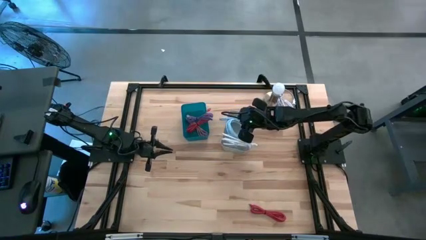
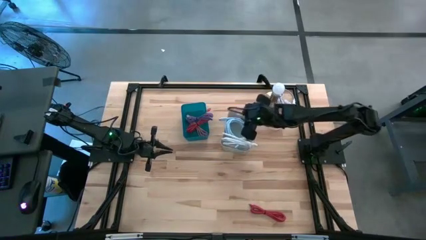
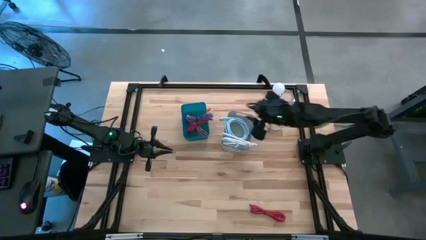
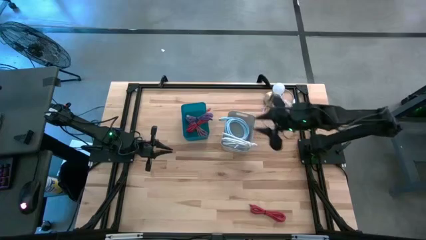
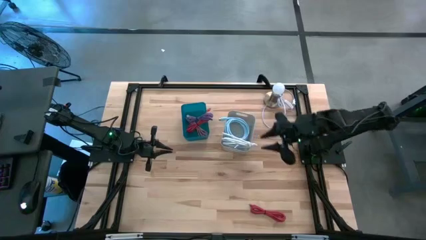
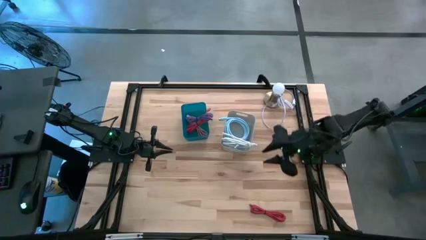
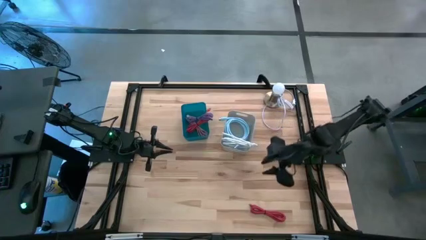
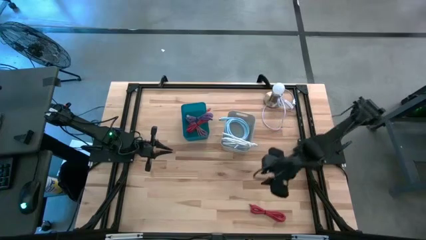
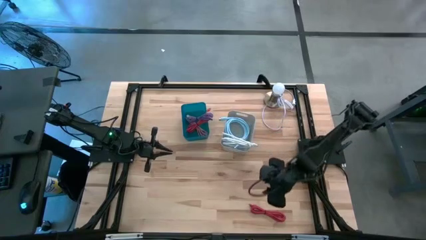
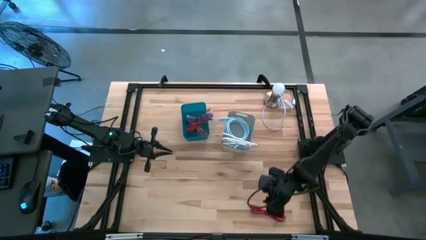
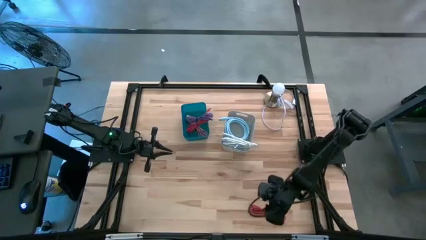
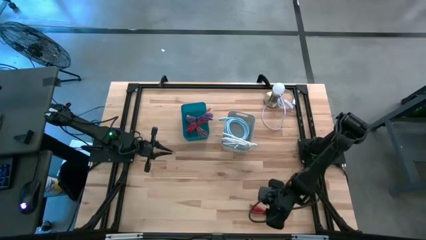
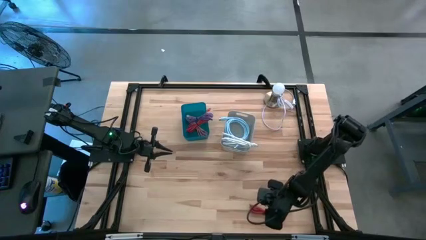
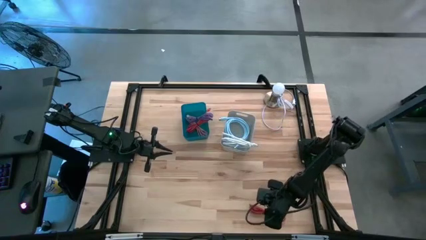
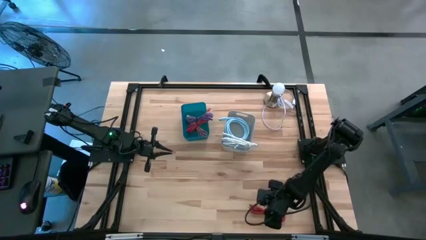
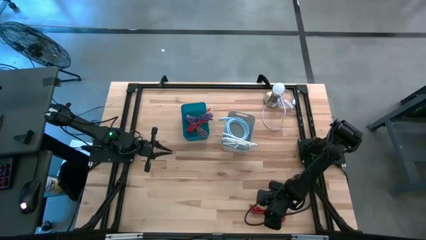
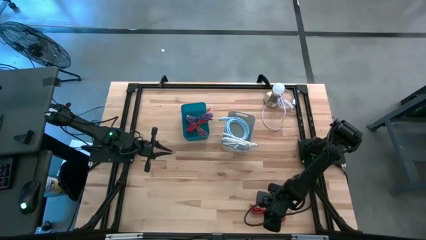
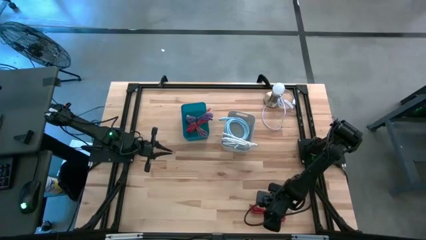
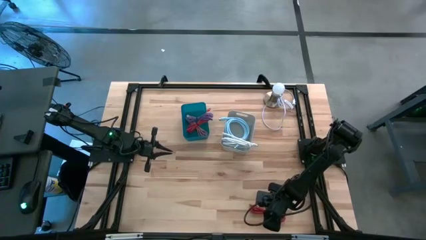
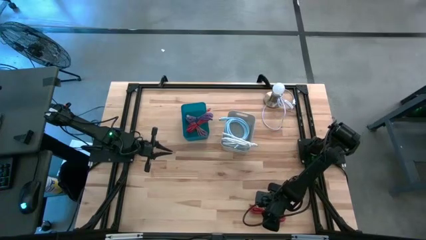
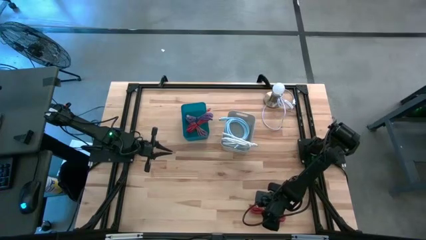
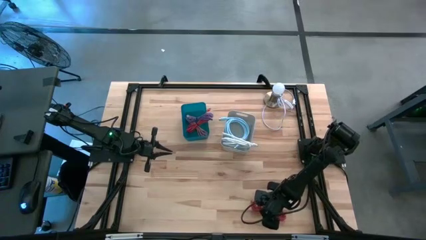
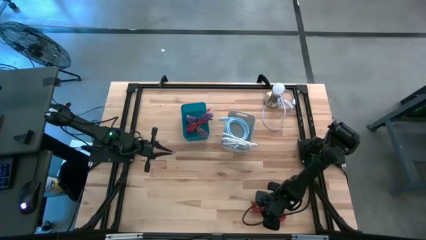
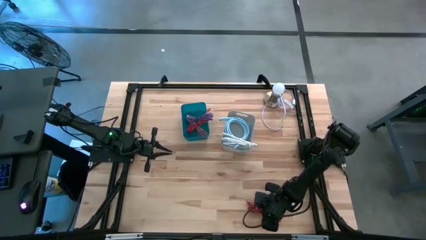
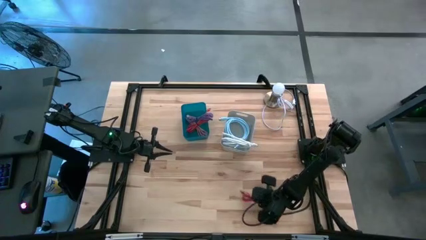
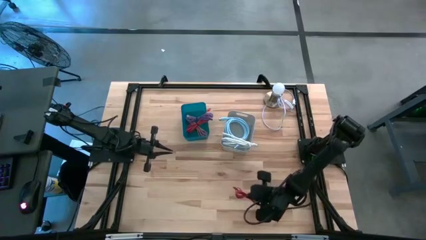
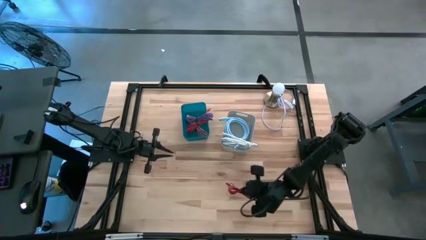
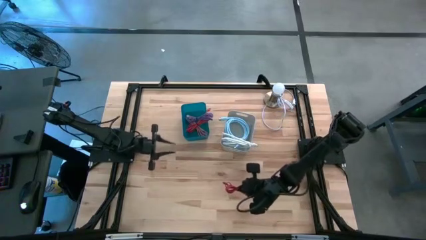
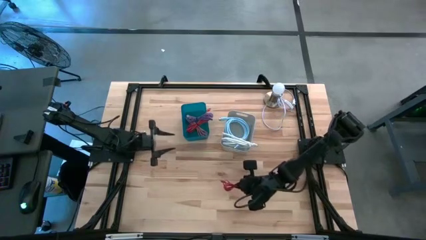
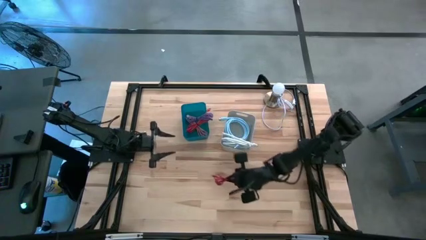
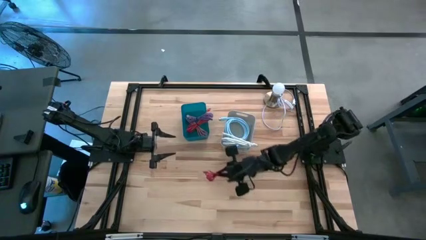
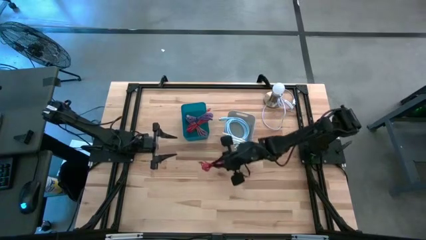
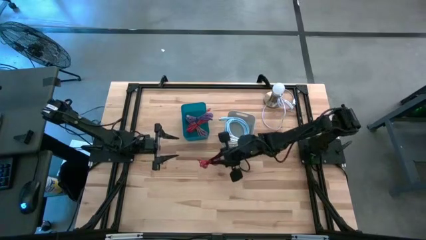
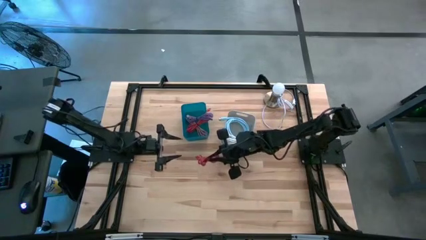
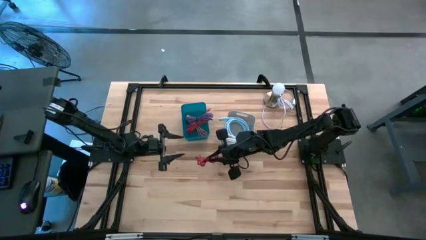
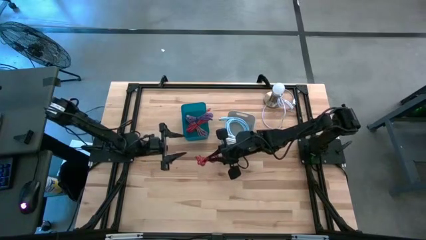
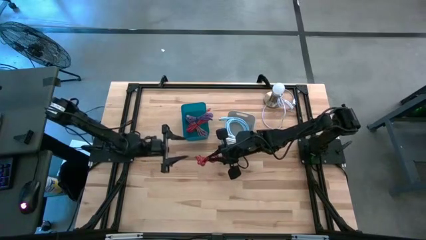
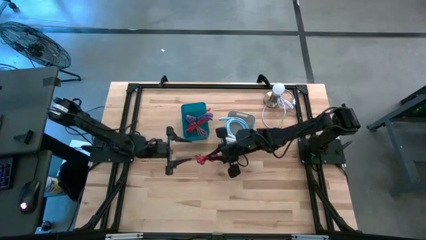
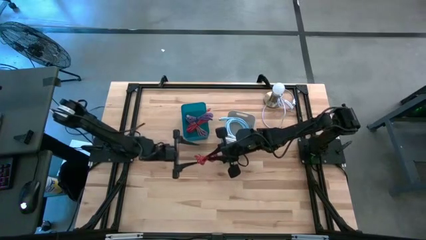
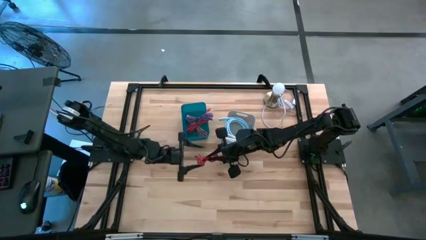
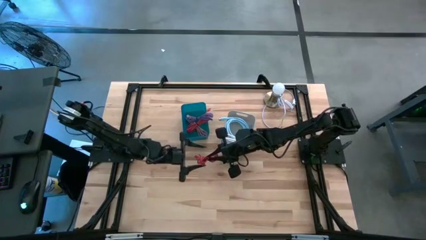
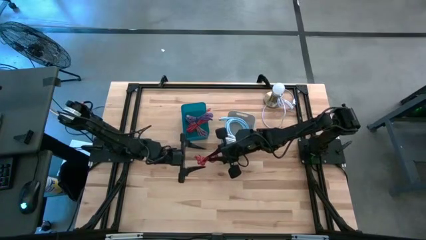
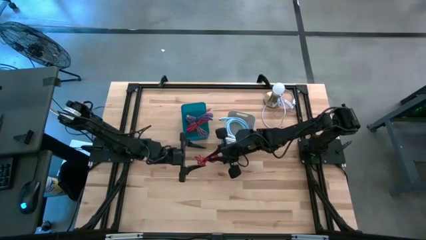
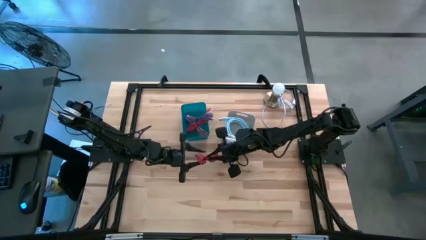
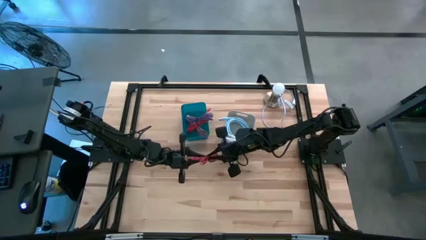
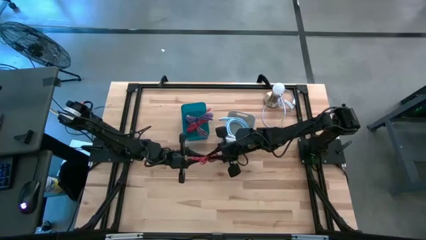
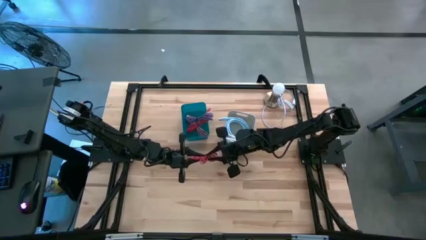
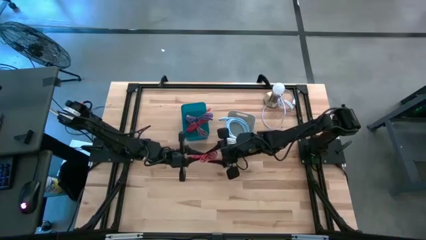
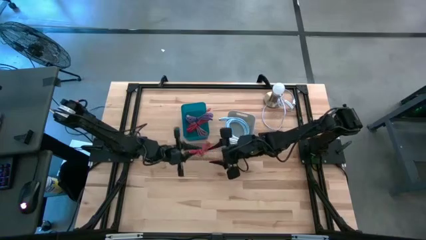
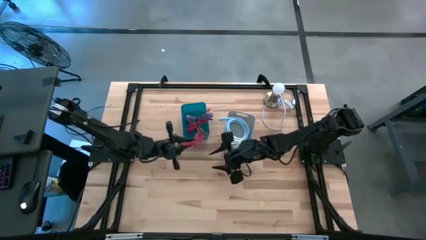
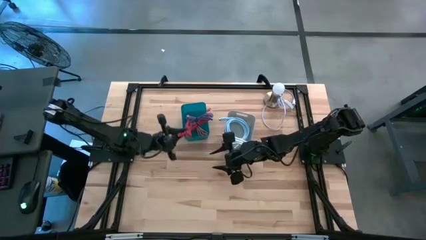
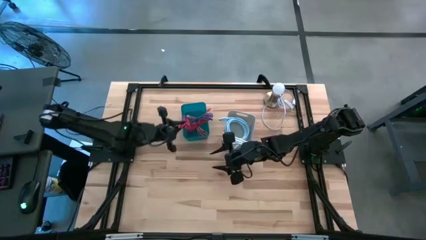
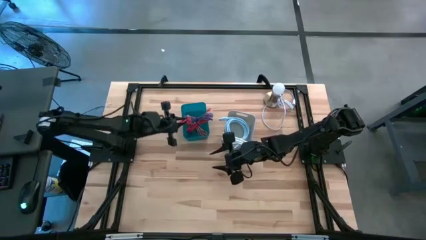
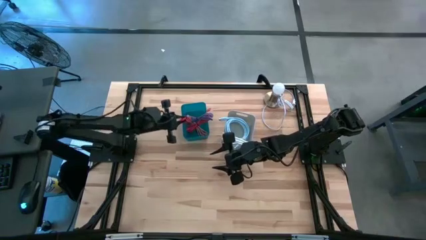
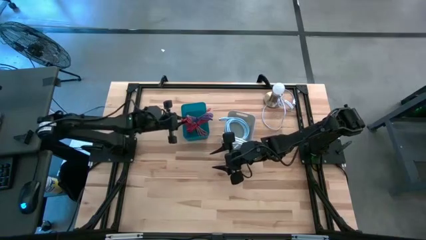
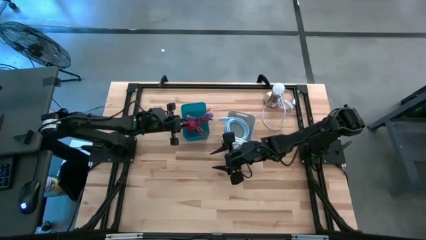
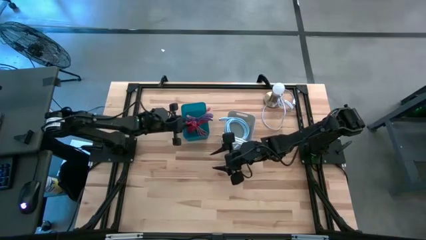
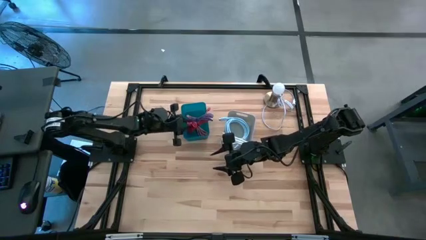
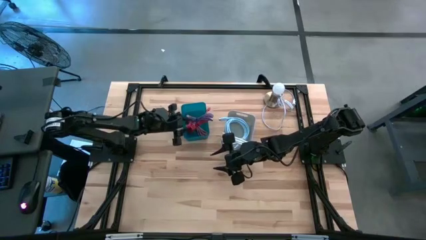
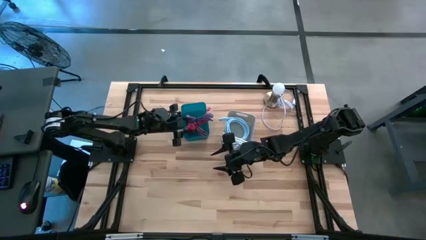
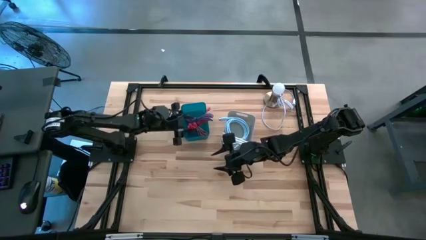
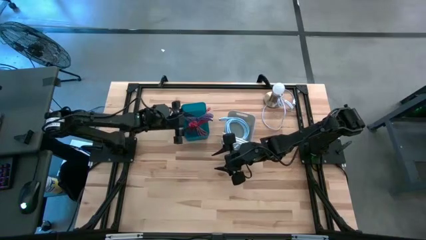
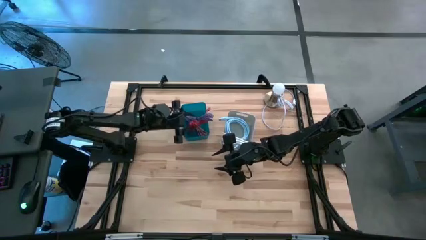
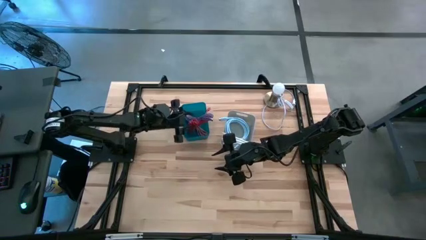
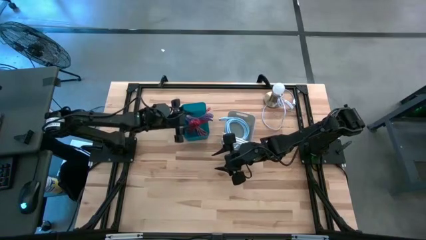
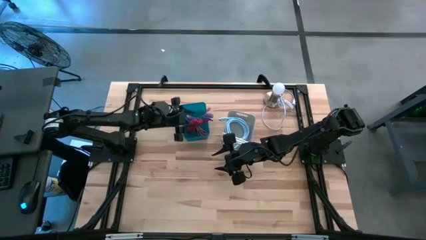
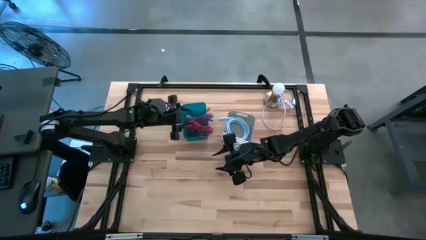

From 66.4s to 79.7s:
Task: Pick & Place USB Port
Put the red charger cable into the blue bin

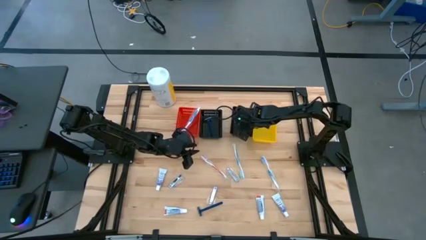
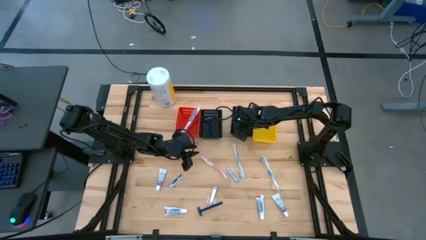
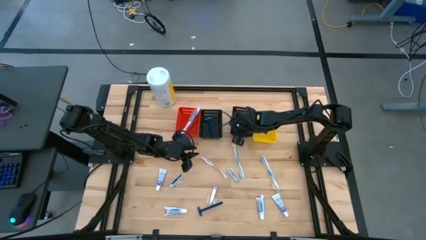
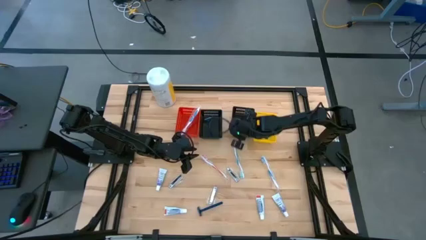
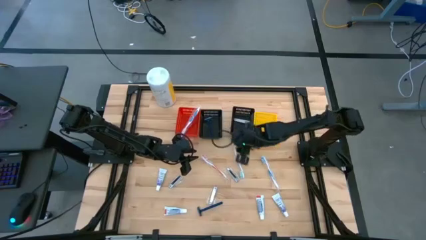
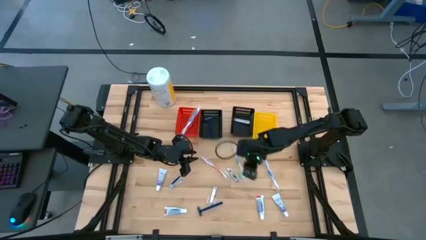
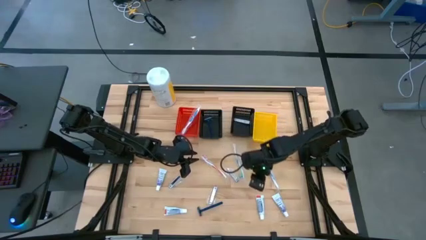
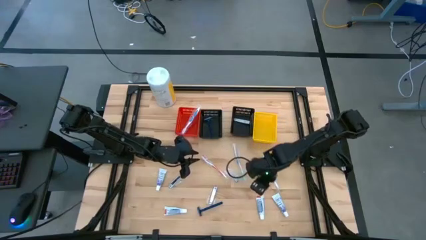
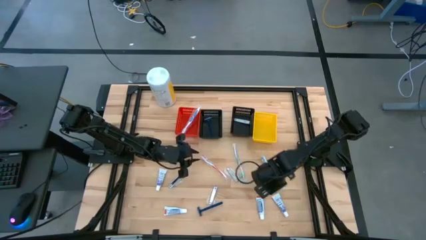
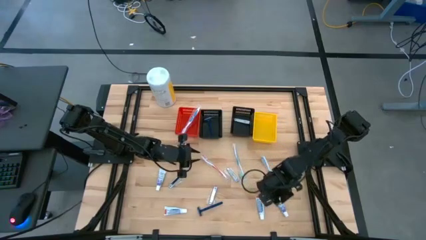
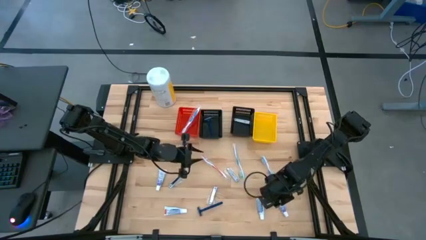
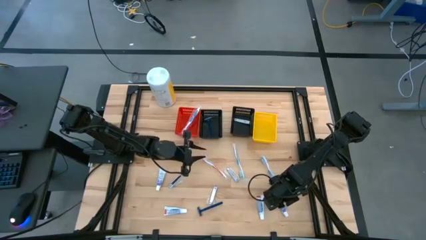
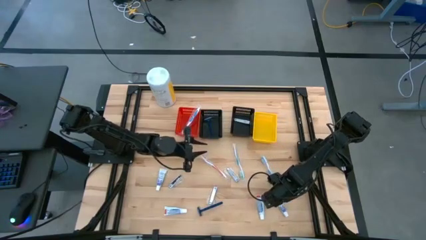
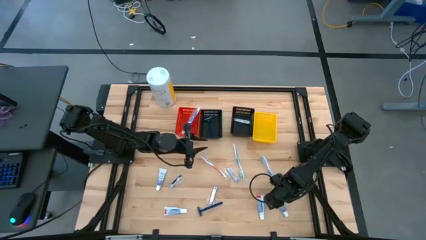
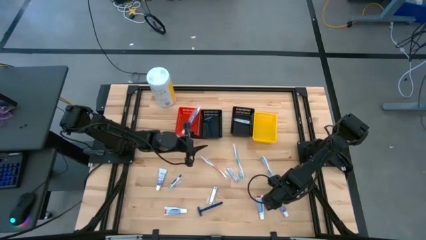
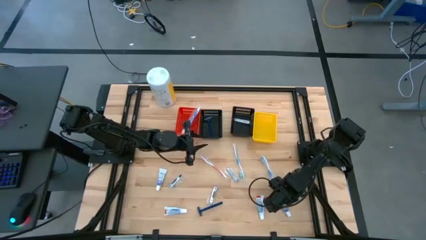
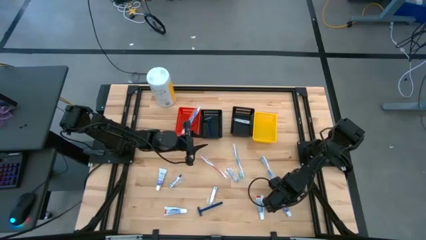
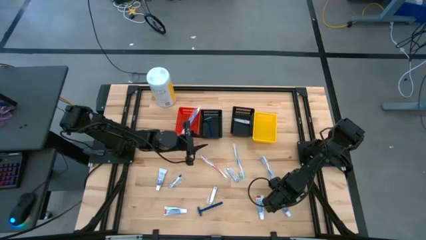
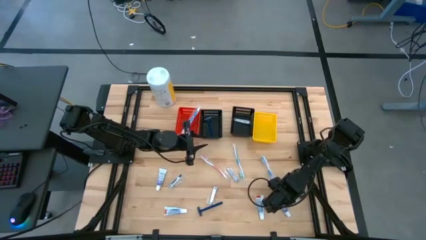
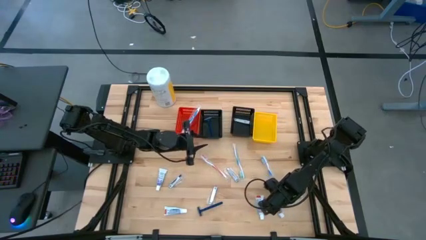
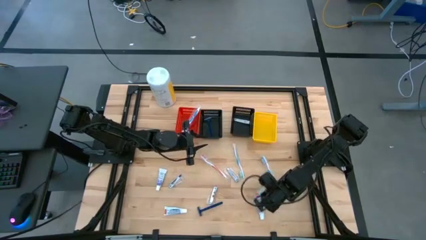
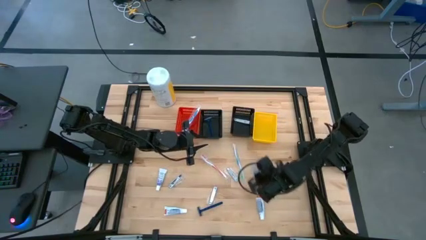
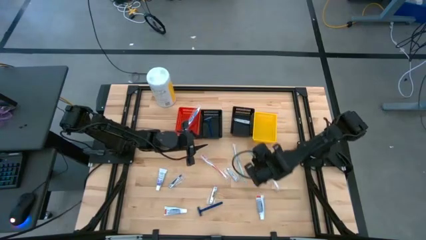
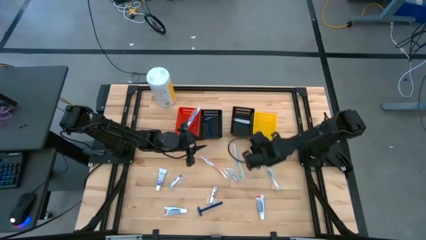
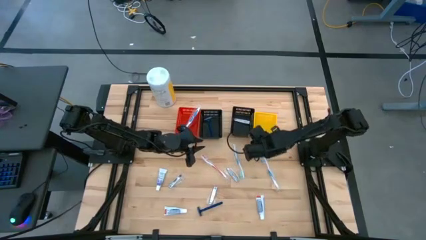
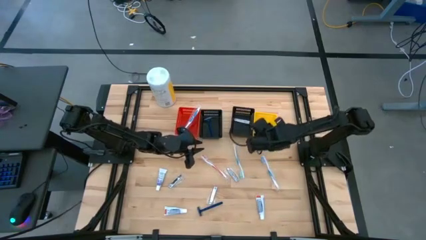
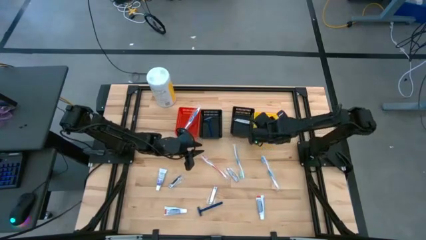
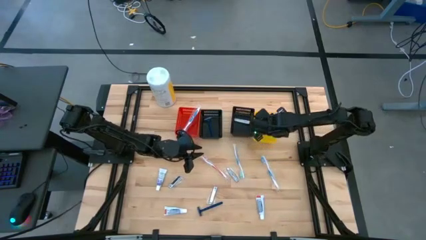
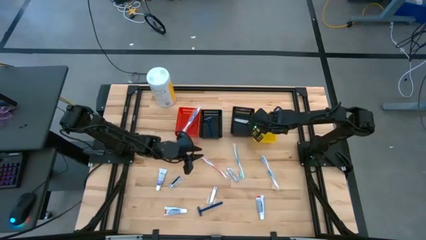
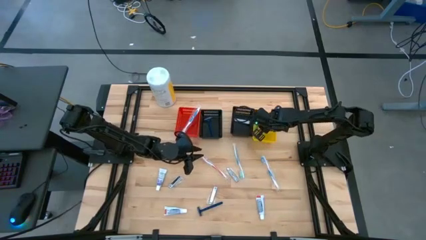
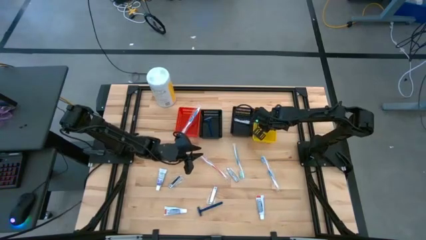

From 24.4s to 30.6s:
Task: Pick & Place Travel size toiletries
Put the white toothpaste into the yellow basket
